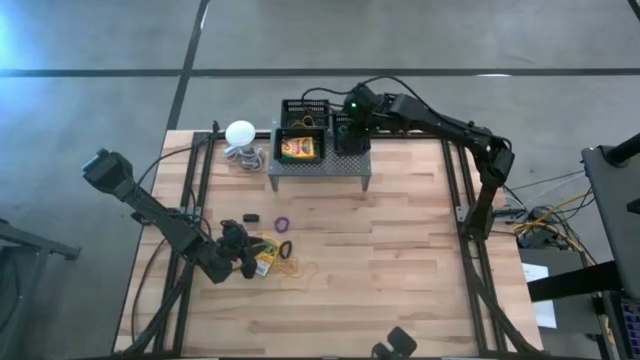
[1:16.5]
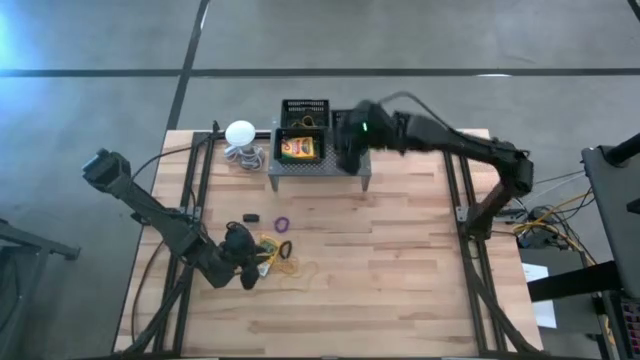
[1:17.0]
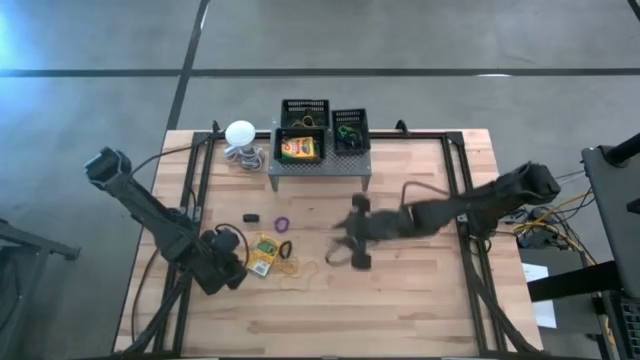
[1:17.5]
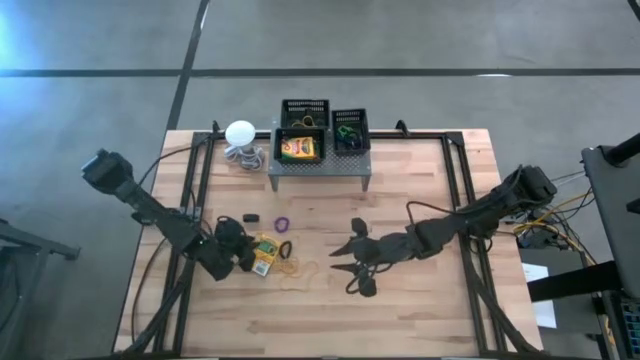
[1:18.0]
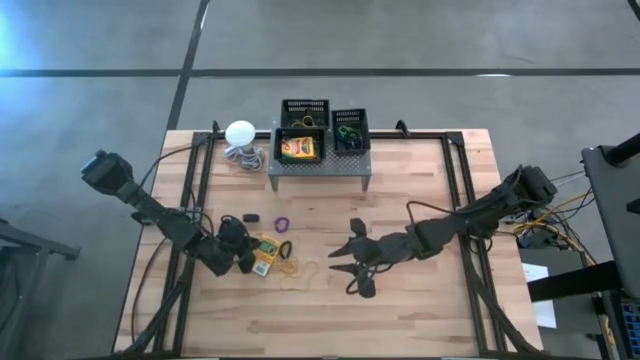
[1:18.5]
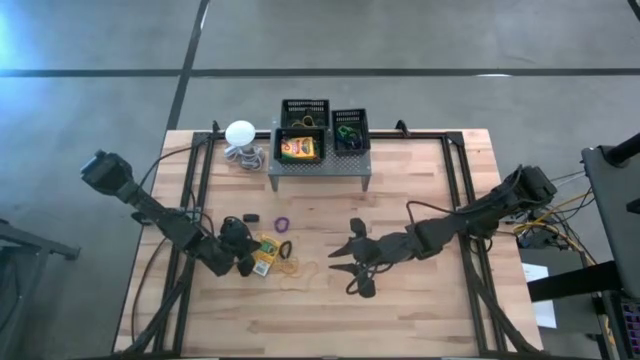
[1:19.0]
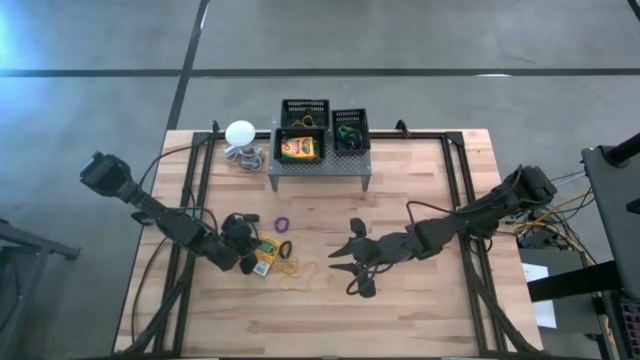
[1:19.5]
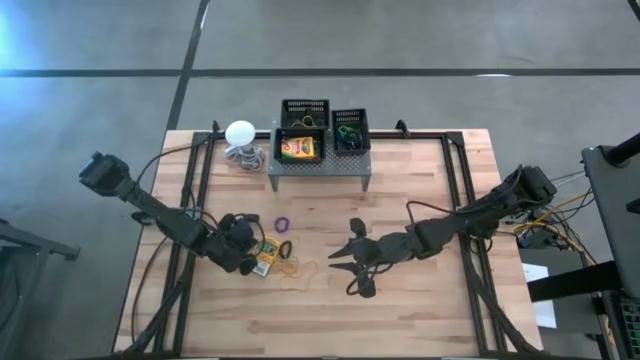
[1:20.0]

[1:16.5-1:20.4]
Task: Pick & Place Office Desk Supplies
Put the yellow rubber band into the top left black bin

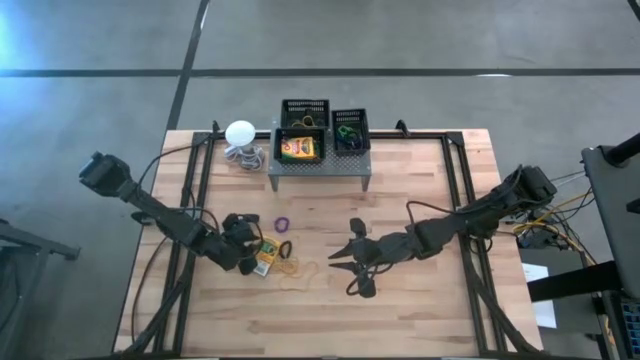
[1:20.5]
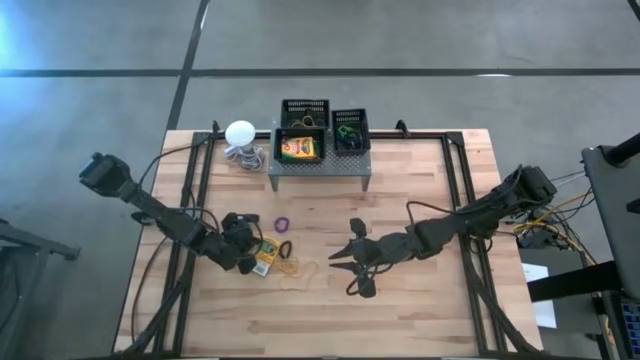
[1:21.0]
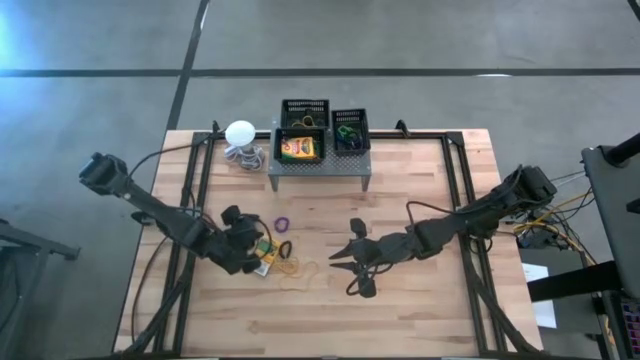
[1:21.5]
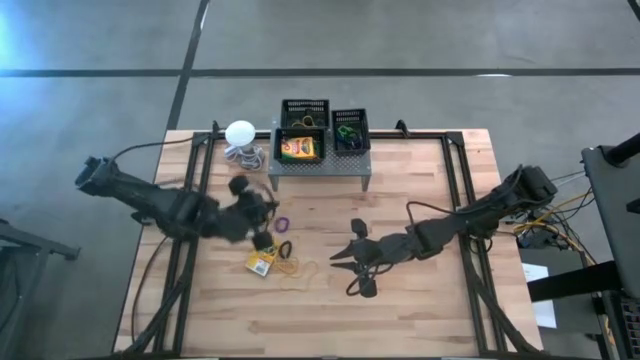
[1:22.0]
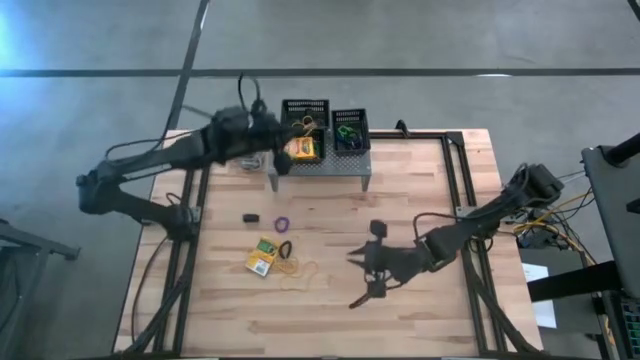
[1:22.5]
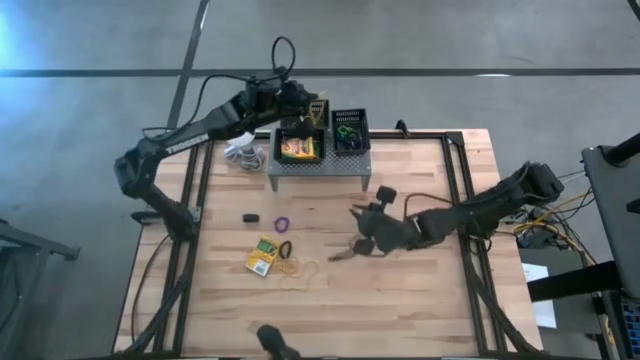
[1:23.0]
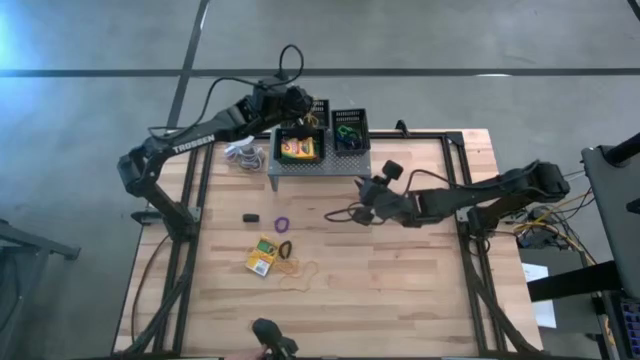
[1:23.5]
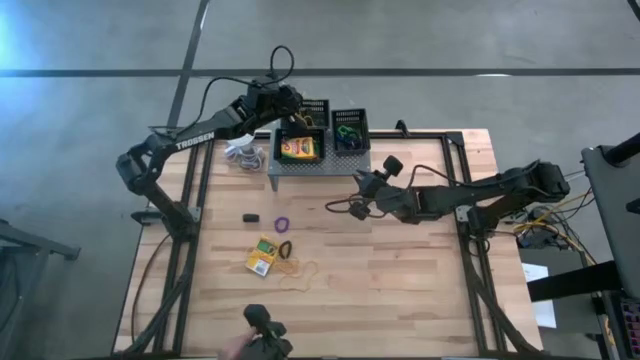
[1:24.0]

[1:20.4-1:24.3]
Put the yellow rubber band into the top left black bin on the shelf

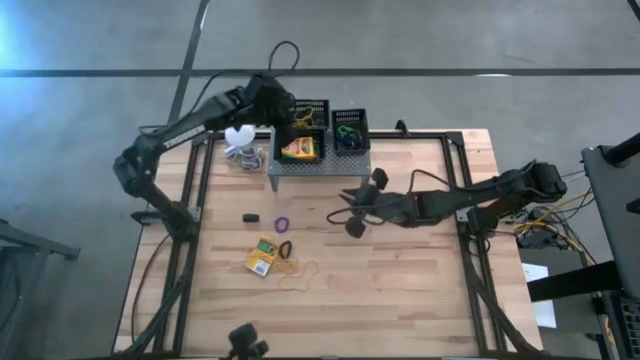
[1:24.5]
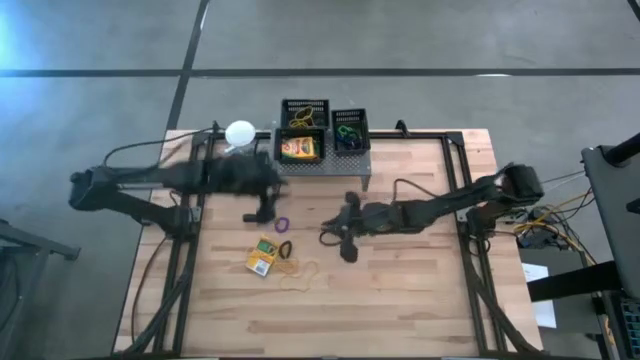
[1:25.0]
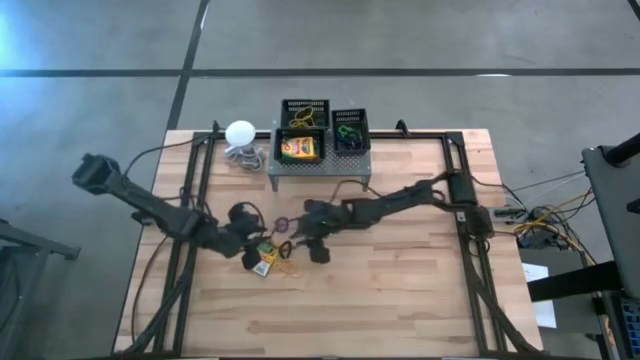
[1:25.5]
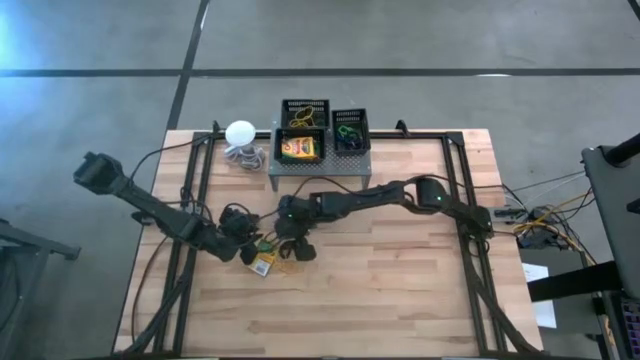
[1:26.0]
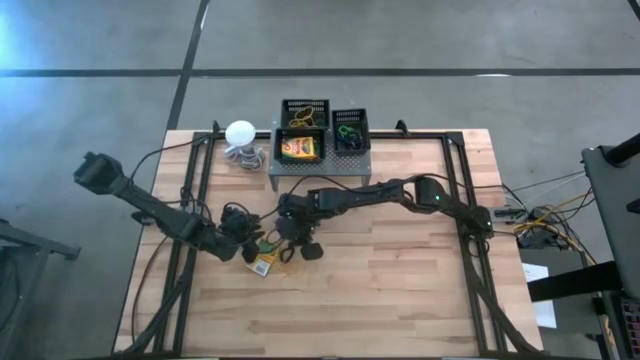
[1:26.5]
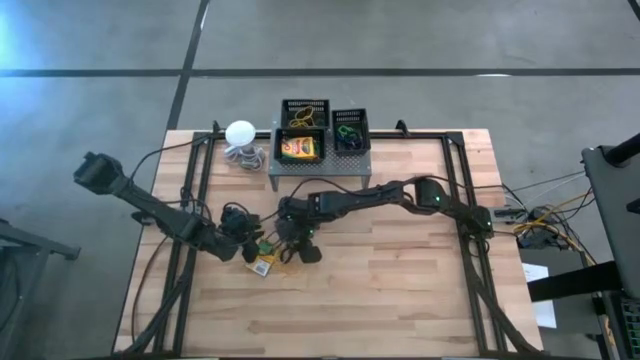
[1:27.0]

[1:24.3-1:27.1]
Put the black spring keychain into the right black bin on the shelf

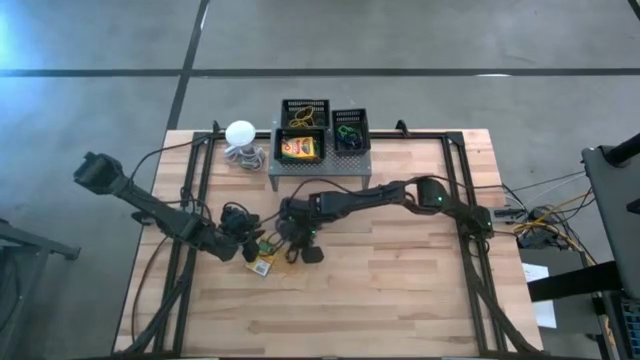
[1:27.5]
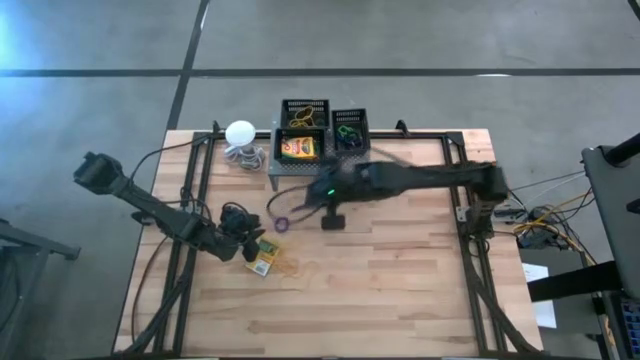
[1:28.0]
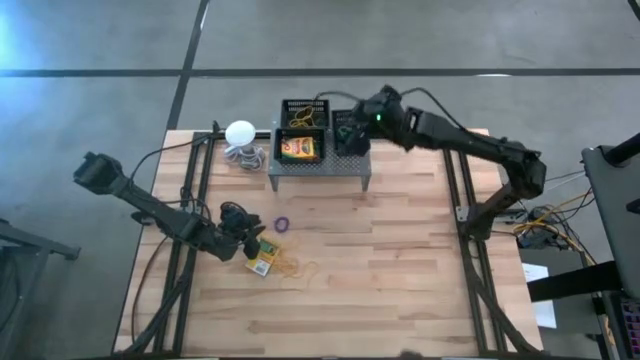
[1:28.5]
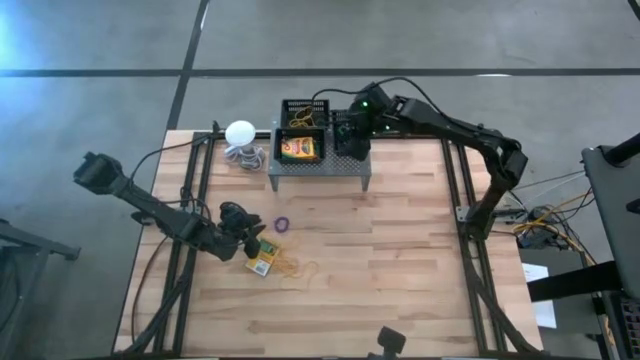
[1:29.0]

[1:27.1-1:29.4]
Put the black spring keychain into the right black bin on the shelf

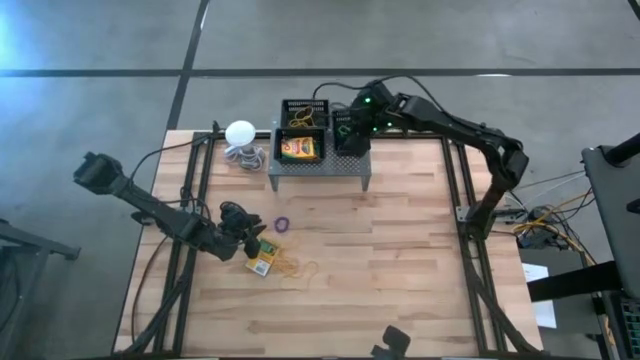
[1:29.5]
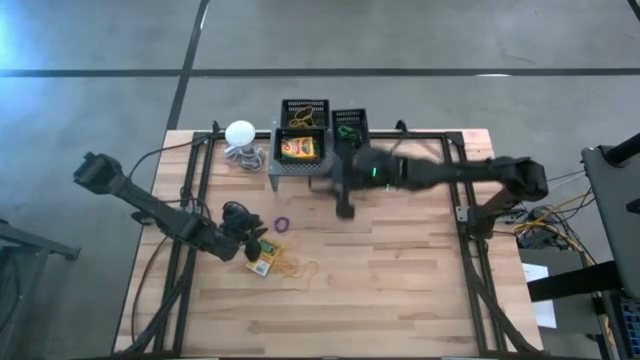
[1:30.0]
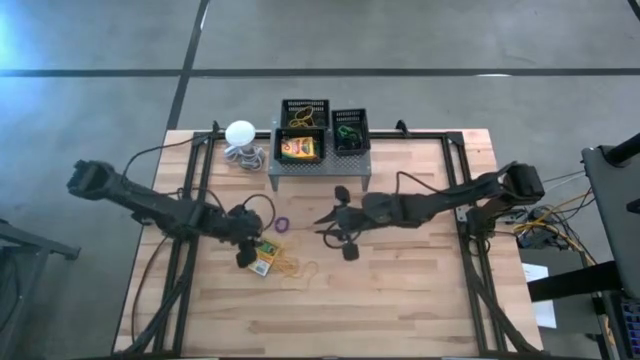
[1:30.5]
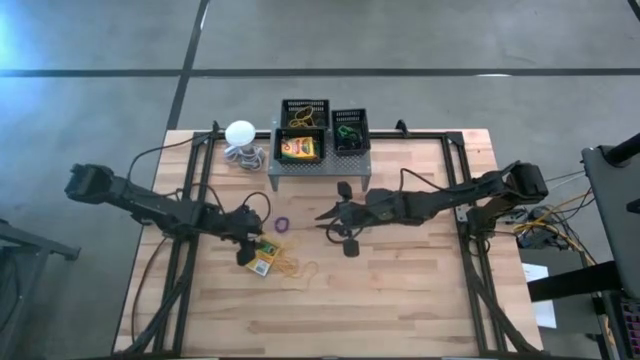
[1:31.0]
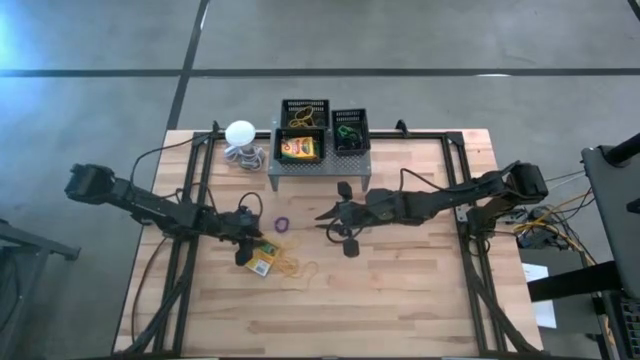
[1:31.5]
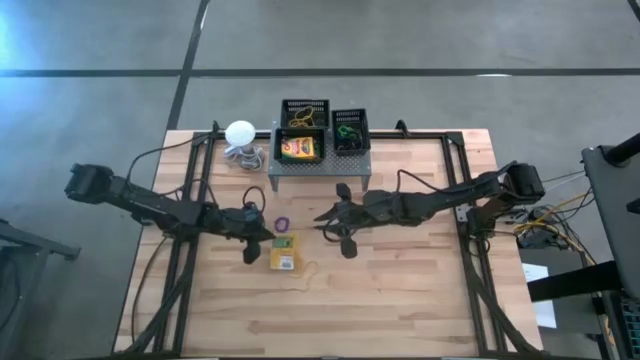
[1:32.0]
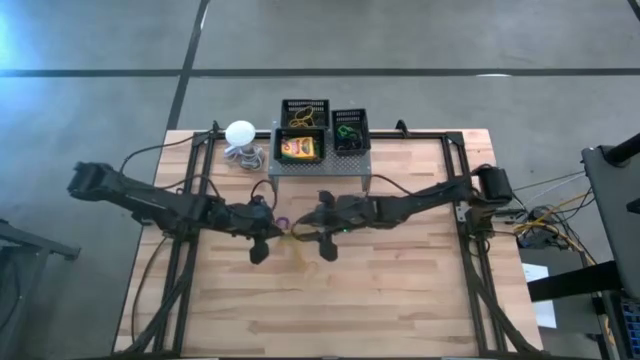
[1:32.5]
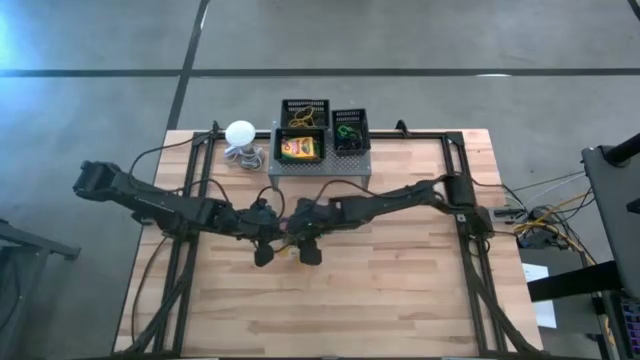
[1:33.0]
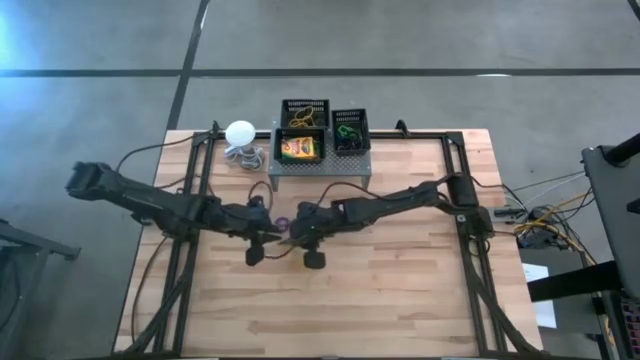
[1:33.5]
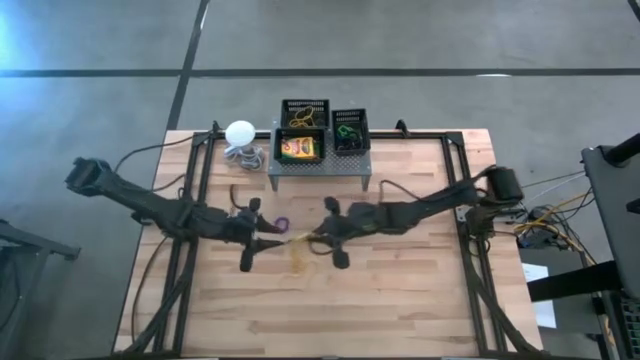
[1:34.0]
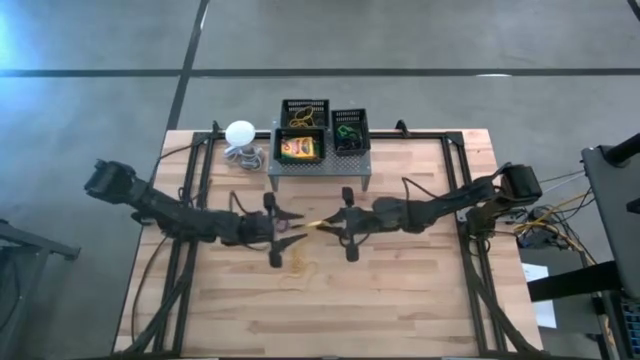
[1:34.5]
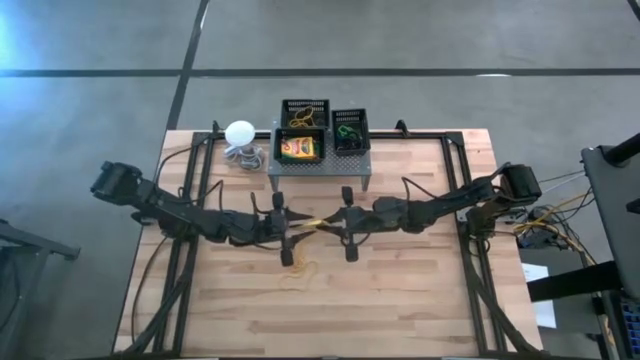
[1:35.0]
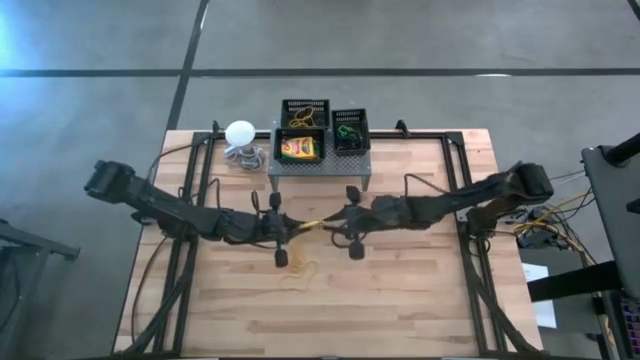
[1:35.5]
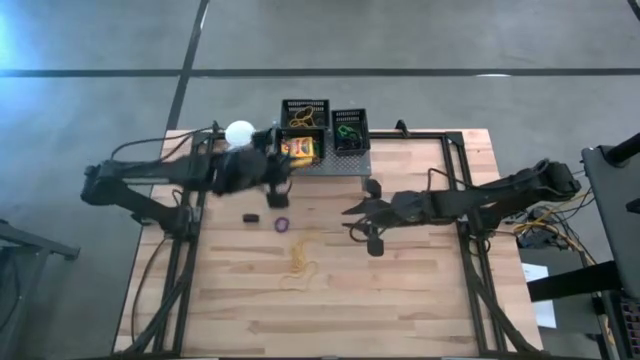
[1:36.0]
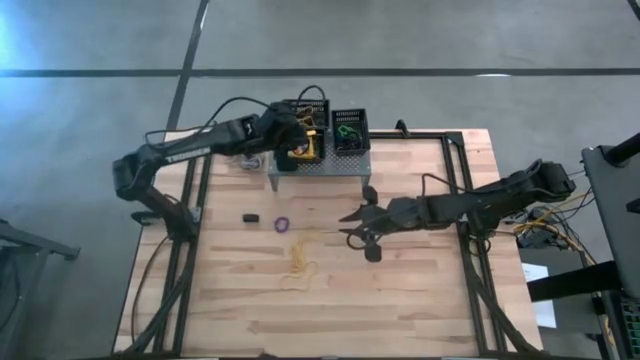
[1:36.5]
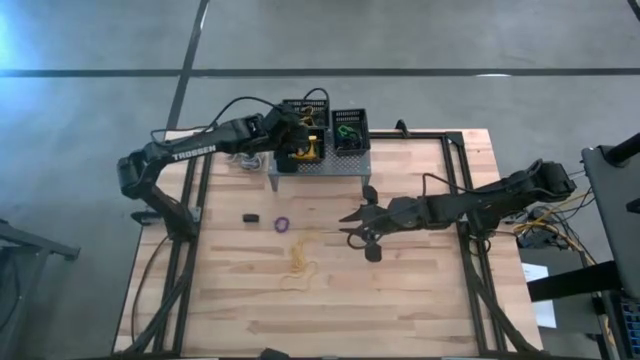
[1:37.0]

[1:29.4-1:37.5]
Put the box of crayons into the bottom left black bin on the shelf
